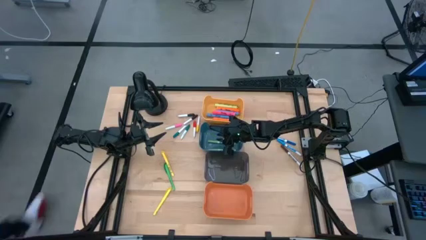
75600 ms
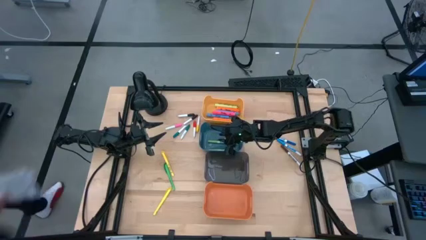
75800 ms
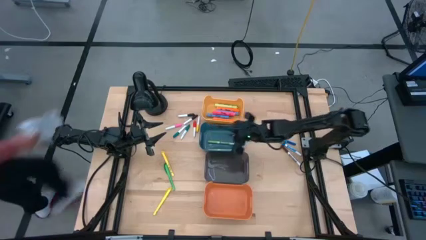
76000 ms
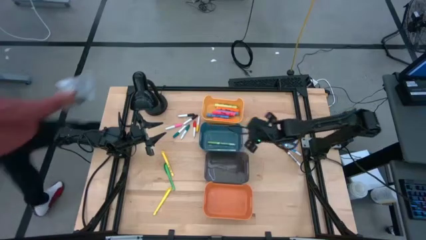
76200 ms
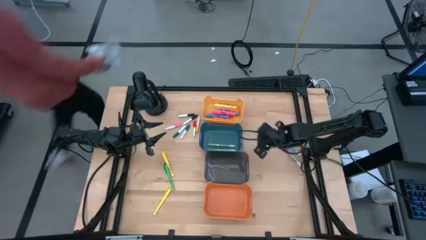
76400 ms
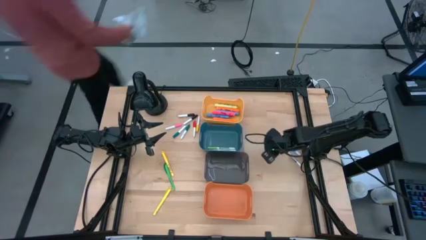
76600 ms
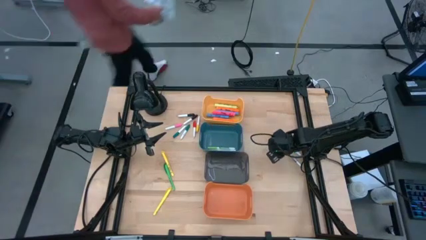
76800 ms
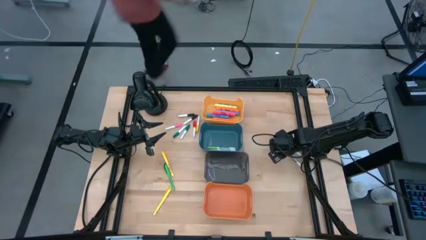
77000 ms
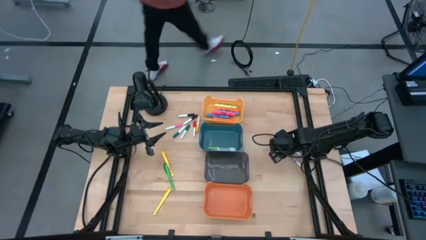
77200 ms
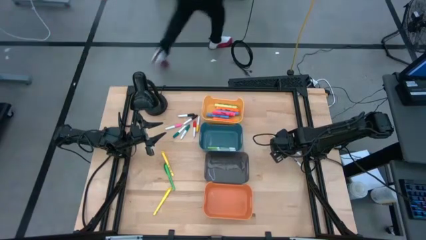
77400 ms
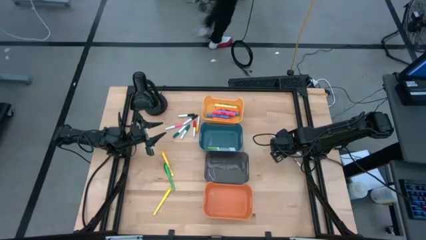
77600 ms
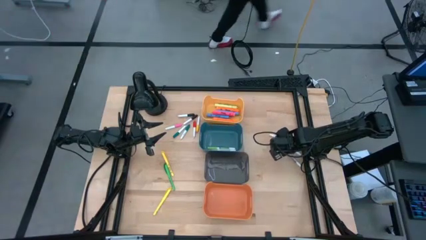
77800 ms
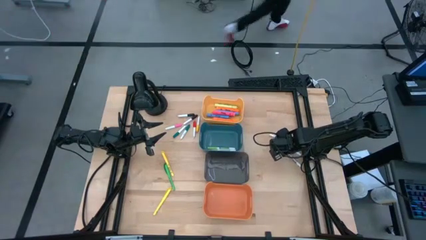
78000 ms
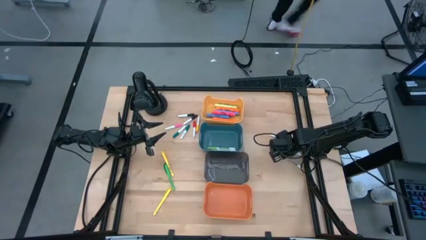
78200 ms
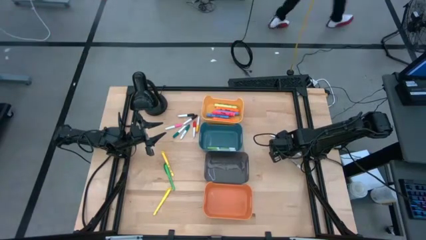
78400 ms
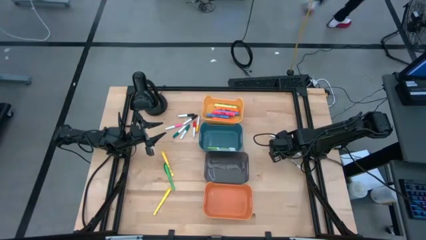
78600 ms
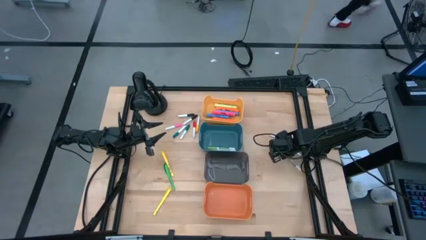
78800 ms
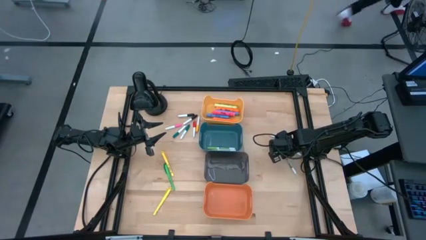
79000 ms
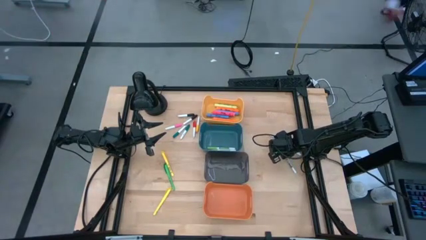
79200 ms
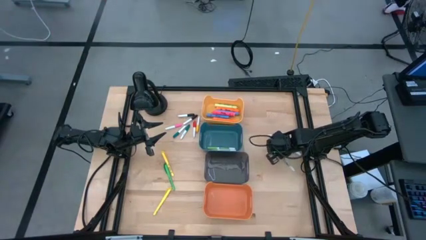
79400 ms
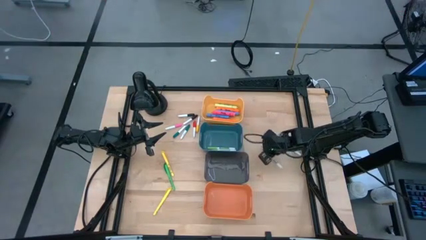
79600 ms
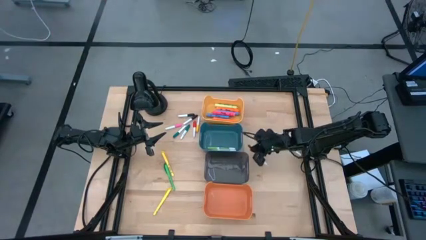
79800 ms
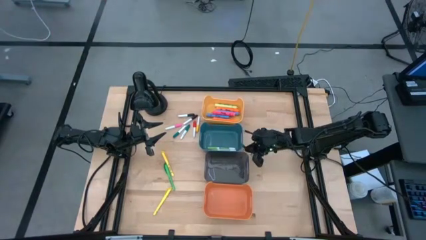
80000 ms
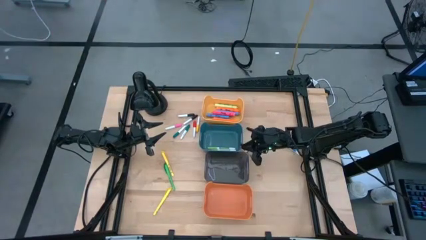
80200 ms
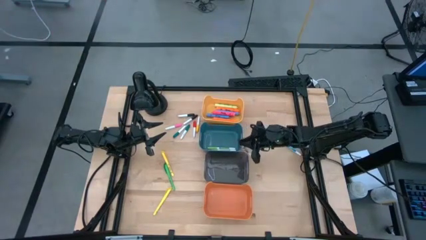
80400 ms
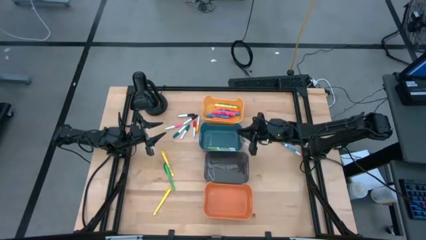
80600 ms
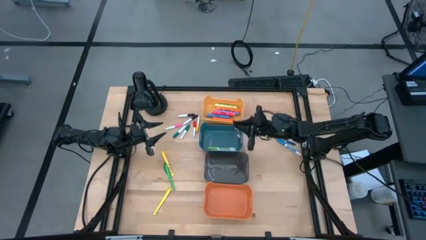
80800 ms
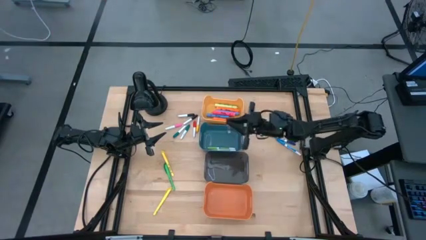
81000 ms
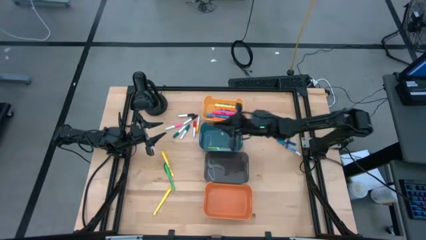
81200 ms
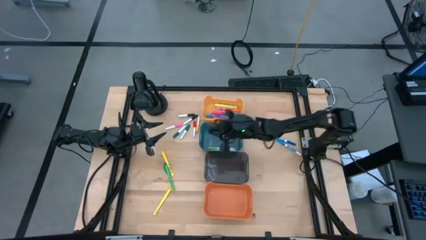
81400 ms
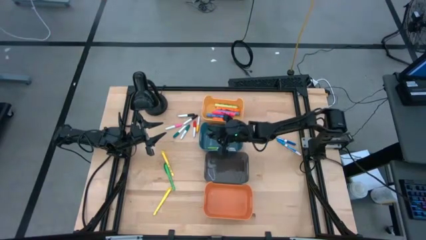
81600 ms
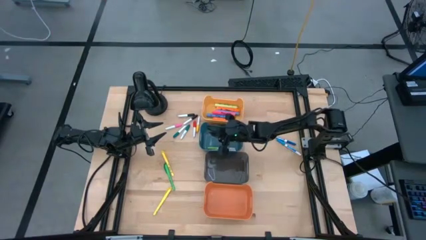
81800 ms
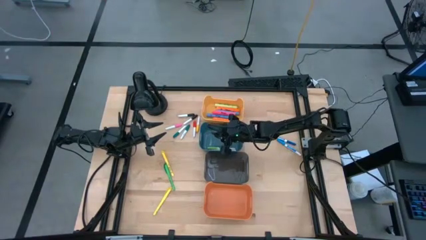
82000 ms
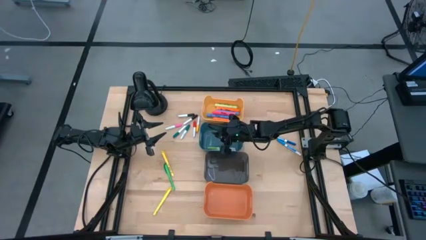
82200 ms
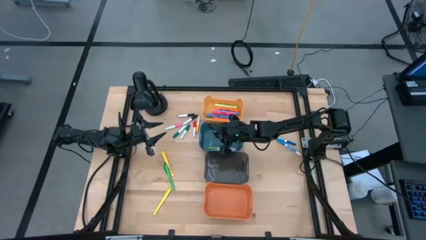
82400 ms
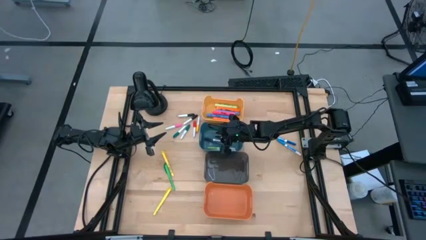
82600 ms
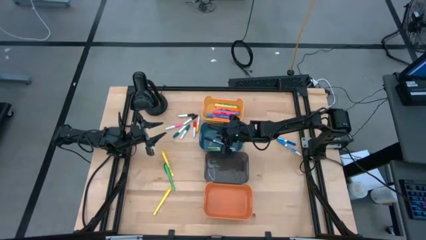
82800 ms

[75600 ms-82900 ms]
Task: Pick & Place Markers
Put the brown thin dry erase marker into the blue bin

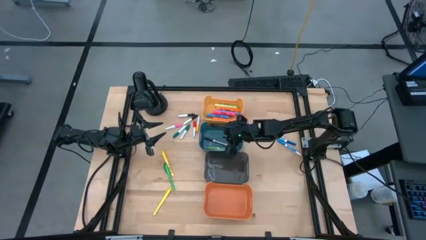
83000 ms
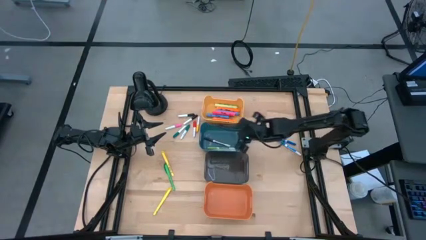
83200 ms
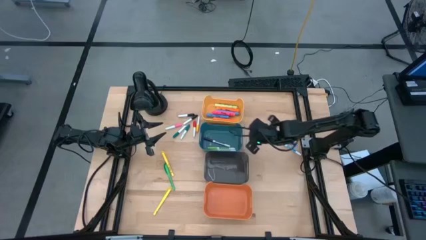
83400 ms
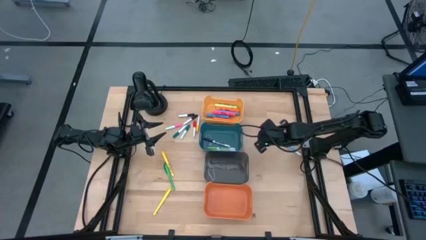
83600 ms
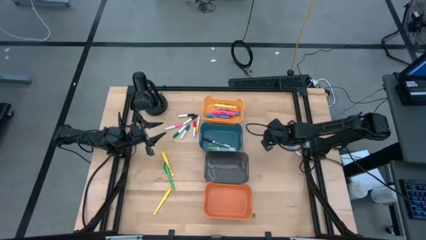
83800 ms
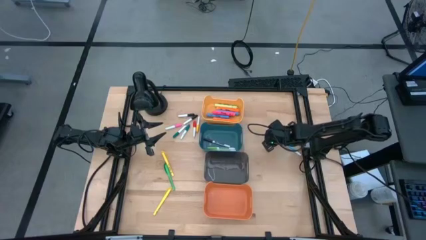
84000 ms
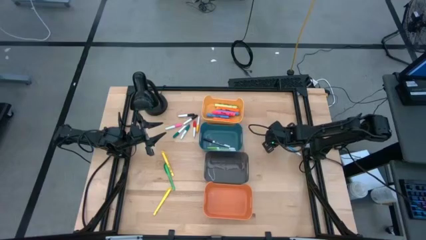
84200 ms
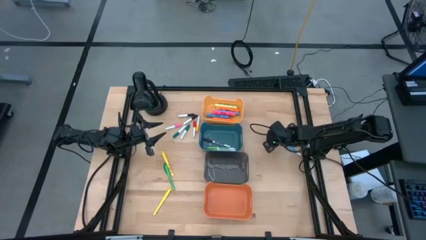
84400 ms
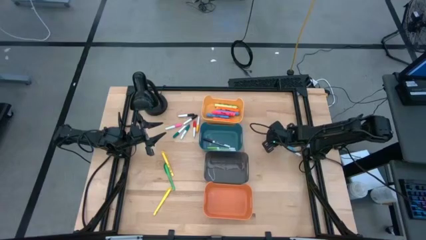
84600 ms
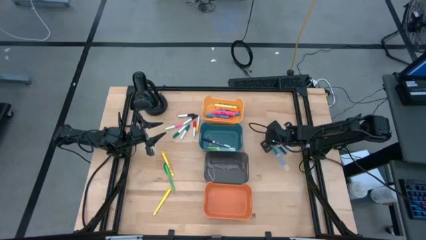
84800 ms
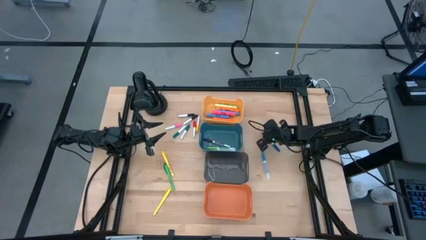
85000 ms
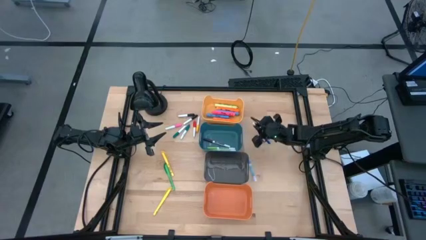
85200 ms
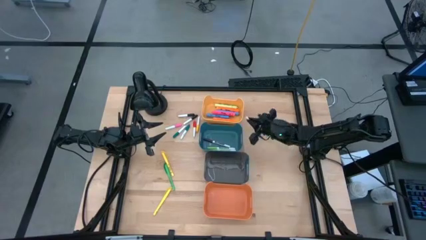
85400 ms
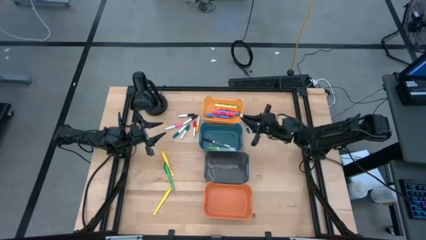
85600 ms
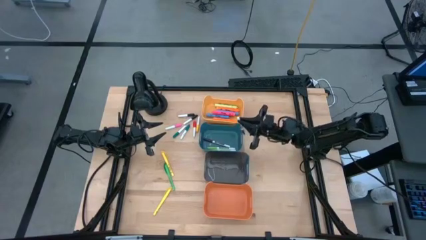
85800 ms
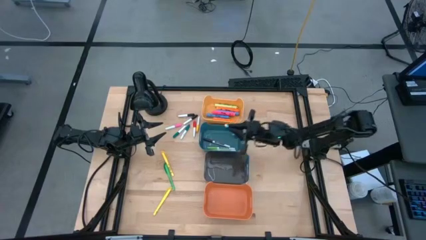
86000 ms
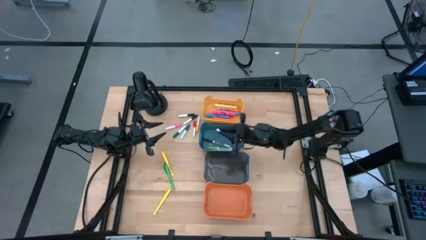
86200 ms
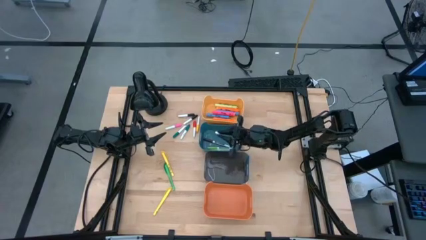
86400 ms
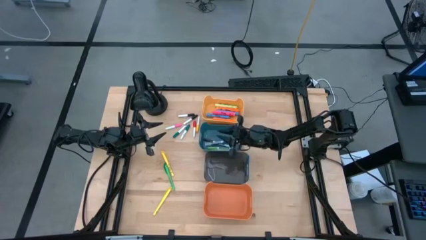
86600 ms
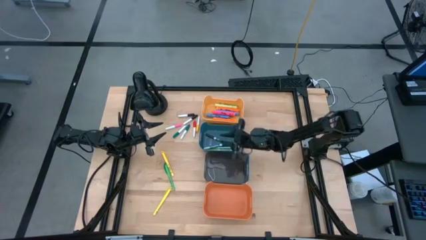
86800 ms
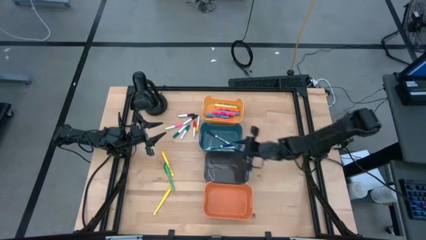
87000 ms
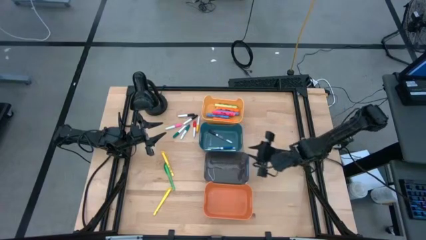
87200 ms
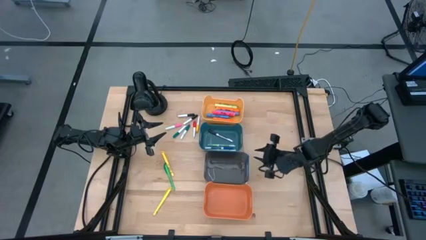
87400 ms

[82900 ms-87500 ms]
Put the dark blue thin dry erase marker into the blue bin

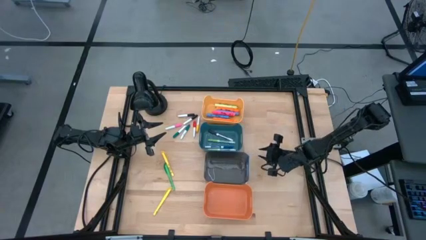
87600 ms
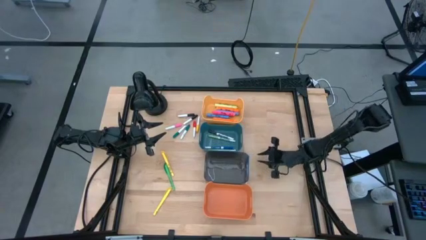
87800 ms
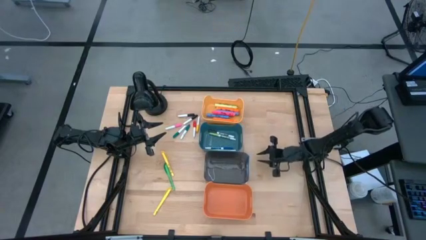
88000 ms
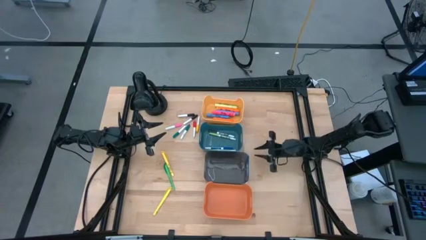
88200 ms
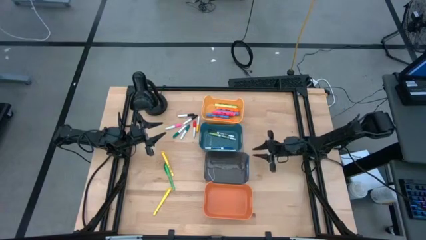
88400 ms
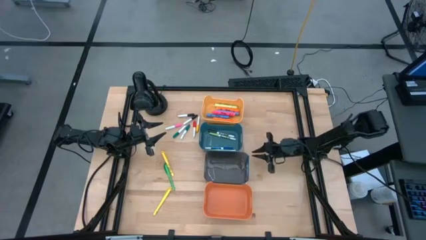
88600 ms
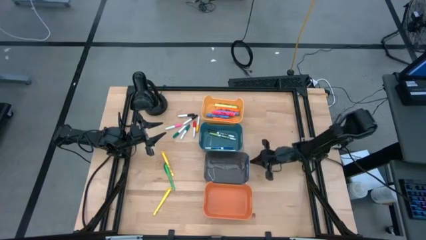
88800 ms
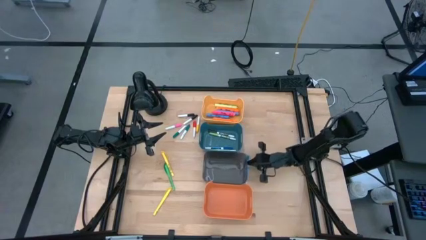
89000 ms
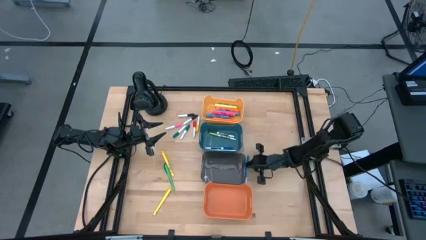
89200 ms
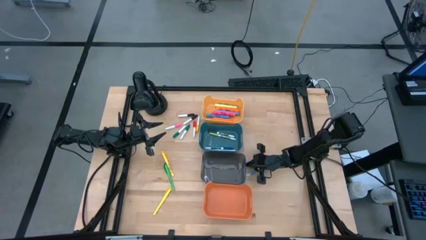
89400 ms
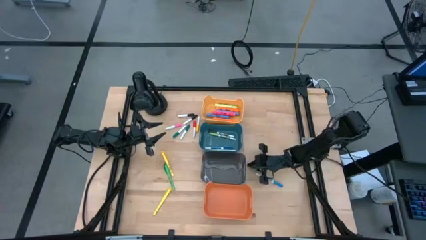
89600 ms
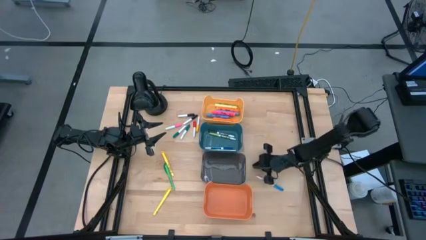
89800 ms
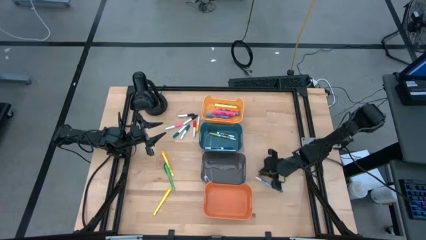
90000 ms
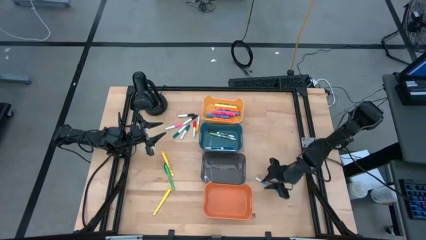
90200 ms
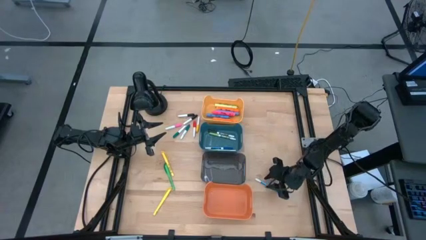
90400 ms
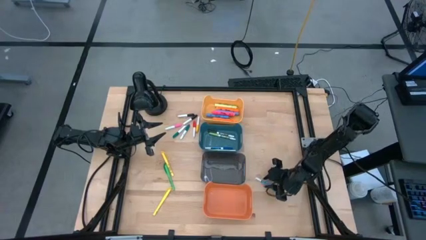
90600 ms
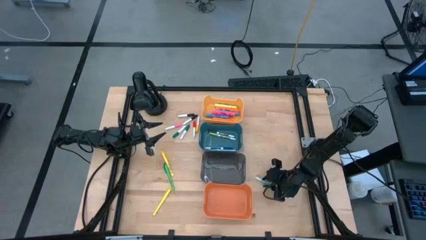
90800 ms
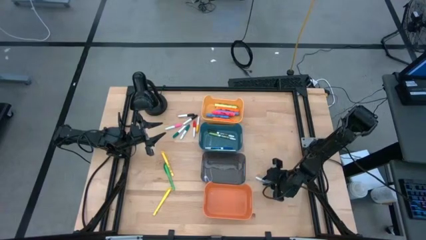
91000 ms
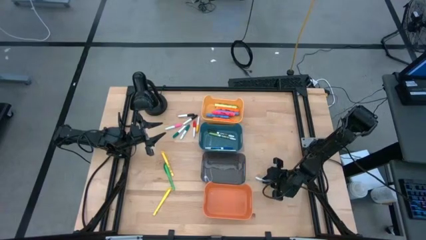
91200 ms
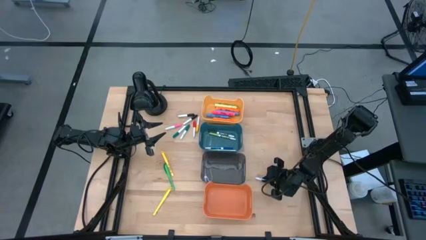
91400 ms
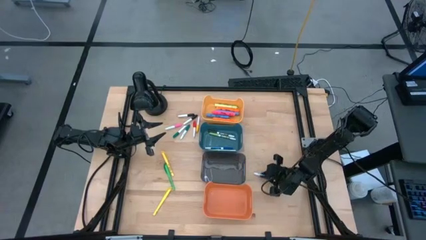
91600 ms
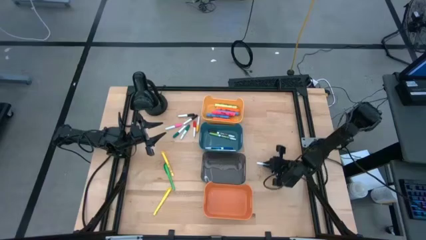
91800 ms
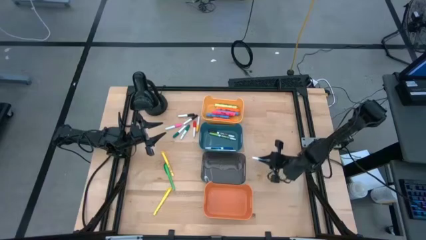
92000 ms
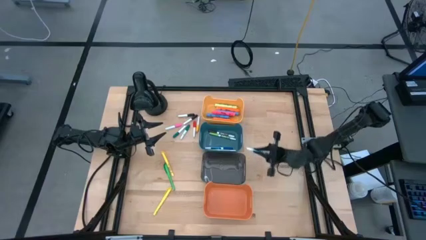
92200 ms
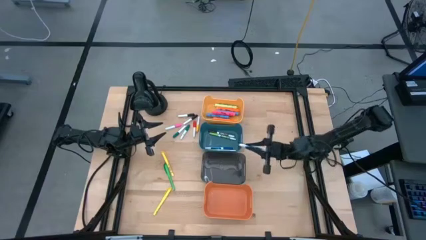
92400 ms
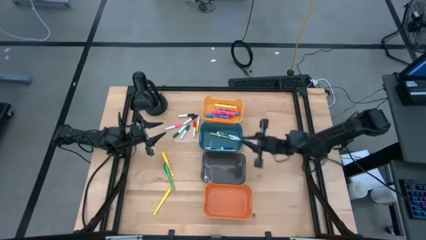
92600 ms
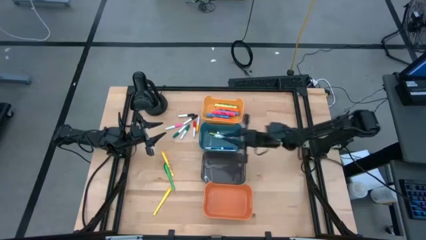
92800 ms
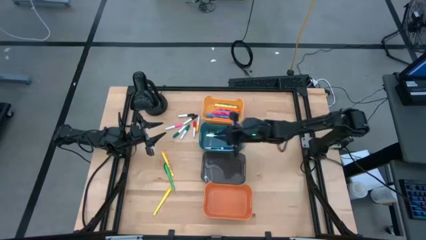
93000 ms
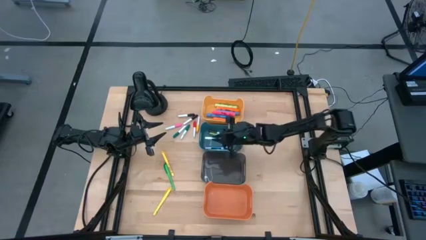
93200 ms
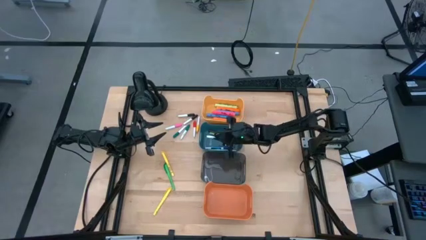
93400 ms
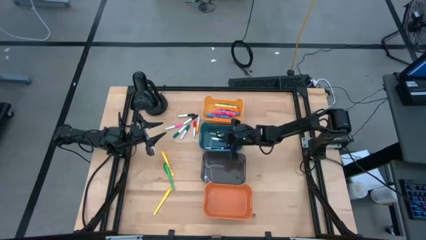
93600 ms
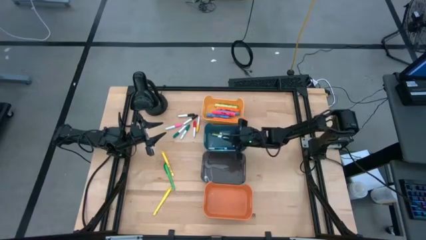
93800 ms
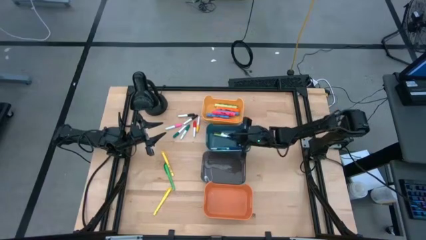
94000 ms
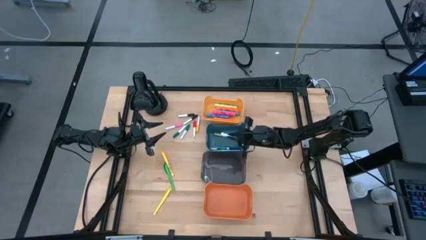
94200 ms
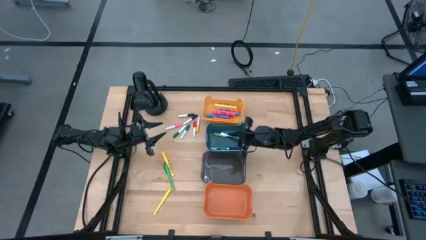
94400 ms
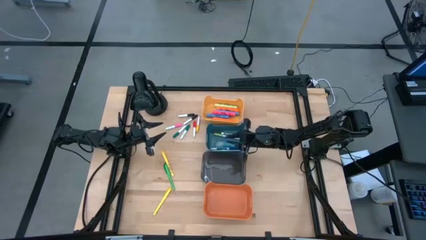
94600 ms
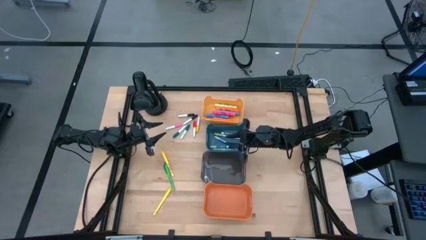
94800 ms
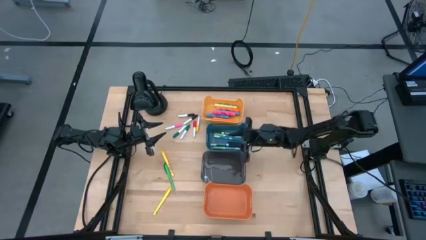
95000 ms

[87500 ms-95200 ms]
Put the blue thin dry erase marker into the blue bin
